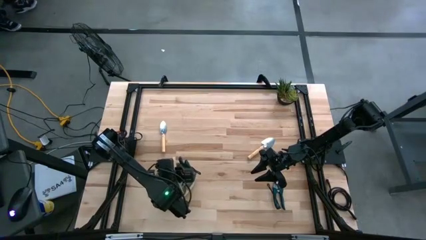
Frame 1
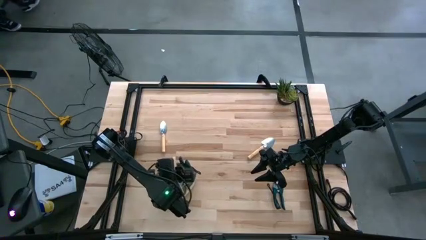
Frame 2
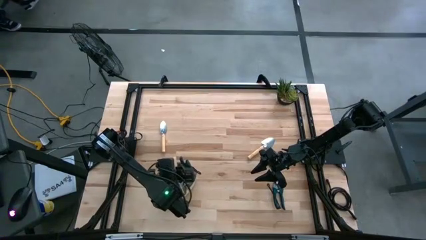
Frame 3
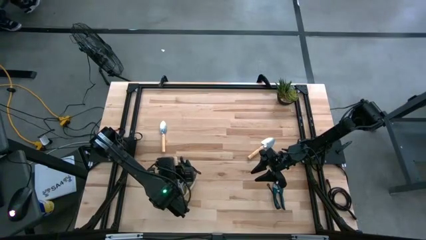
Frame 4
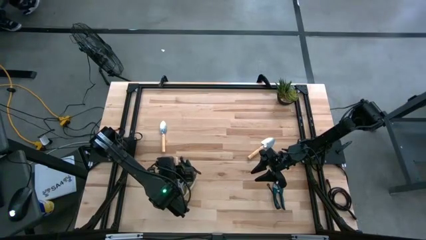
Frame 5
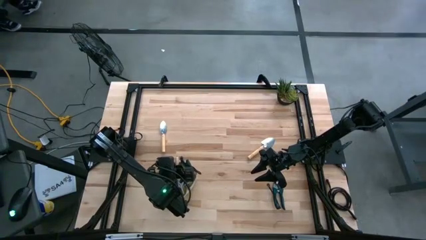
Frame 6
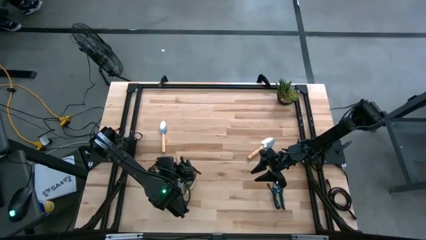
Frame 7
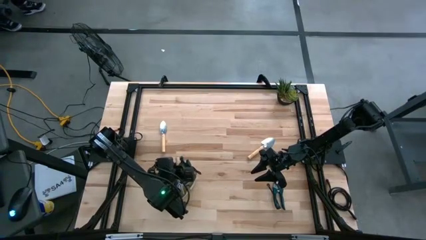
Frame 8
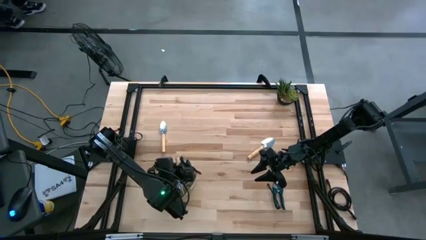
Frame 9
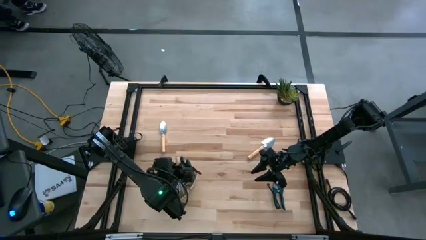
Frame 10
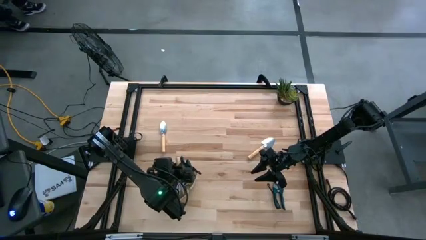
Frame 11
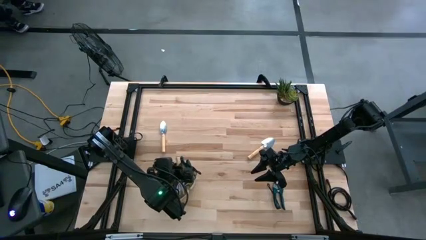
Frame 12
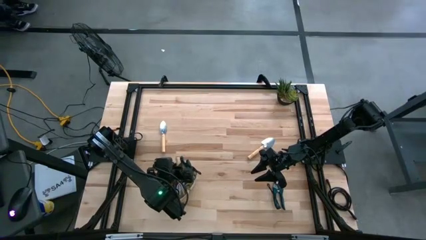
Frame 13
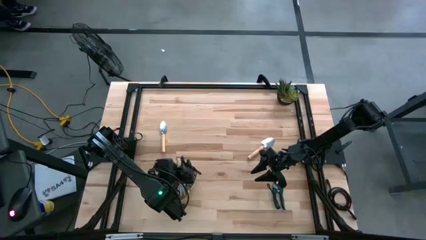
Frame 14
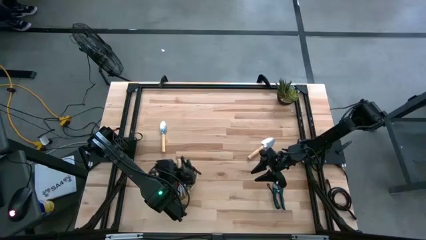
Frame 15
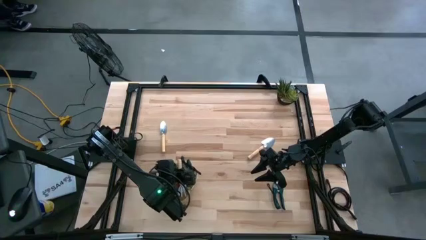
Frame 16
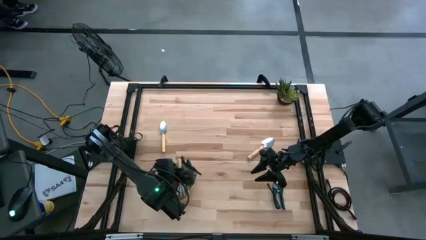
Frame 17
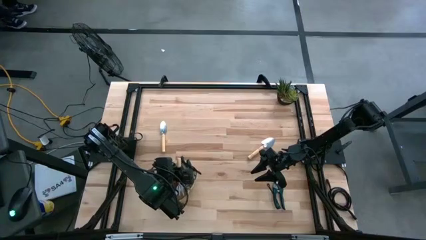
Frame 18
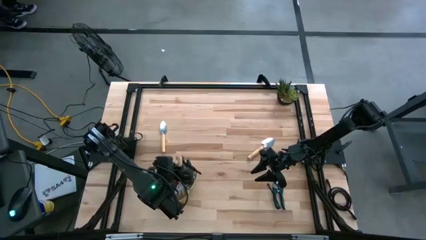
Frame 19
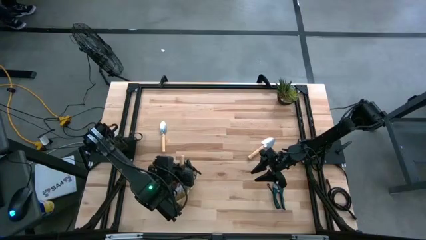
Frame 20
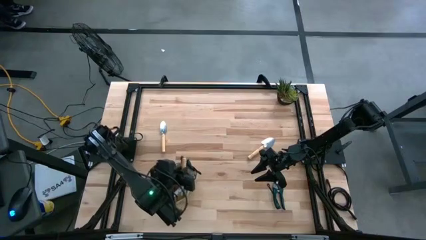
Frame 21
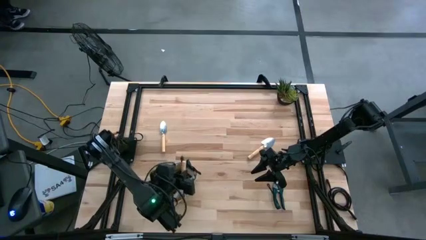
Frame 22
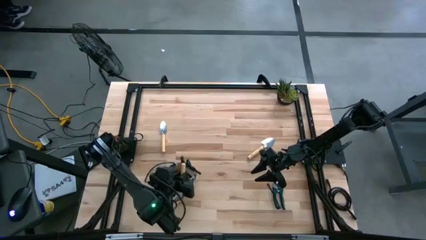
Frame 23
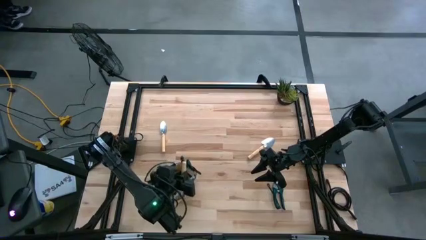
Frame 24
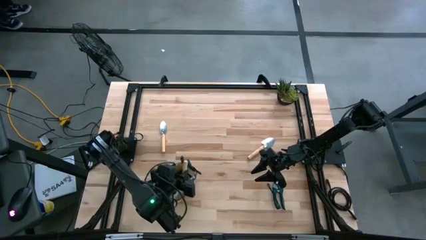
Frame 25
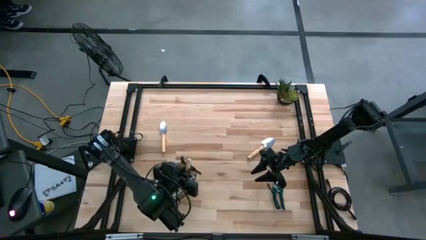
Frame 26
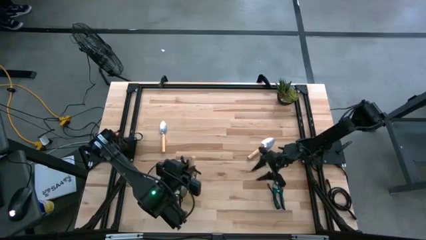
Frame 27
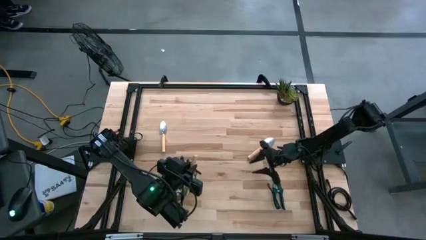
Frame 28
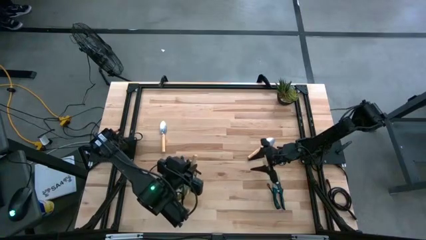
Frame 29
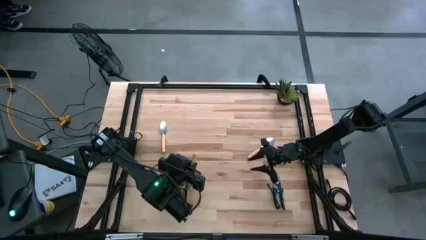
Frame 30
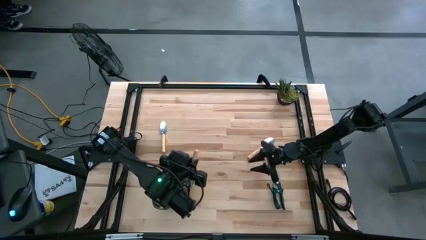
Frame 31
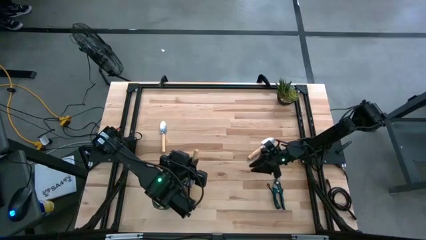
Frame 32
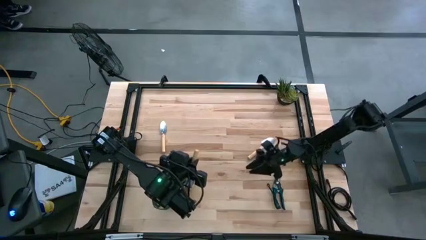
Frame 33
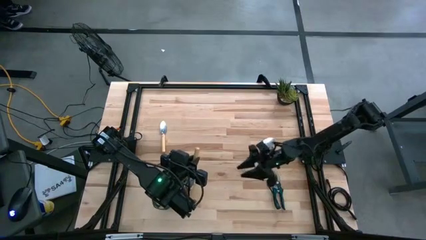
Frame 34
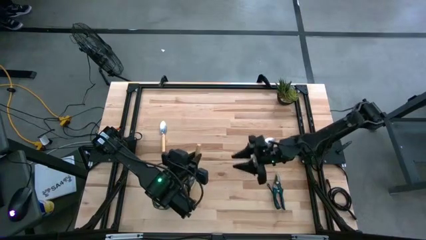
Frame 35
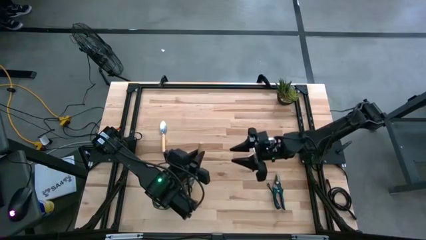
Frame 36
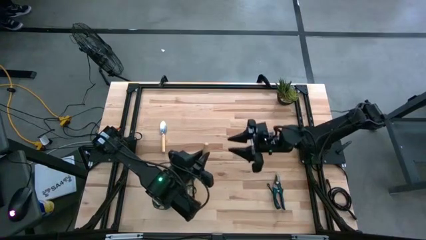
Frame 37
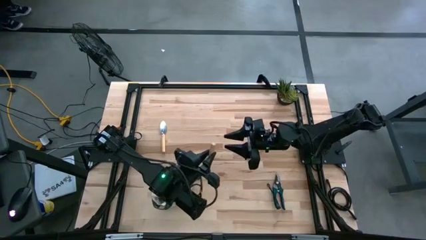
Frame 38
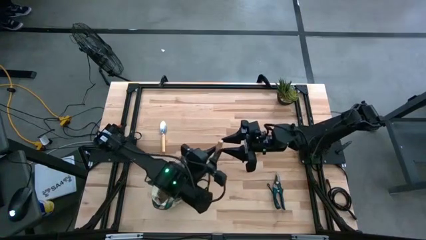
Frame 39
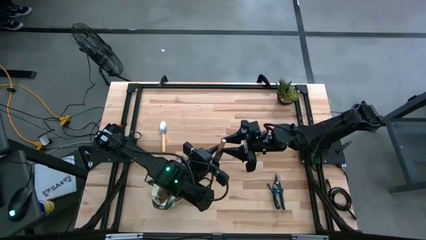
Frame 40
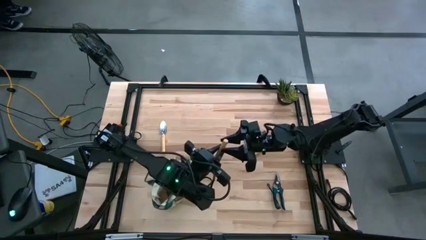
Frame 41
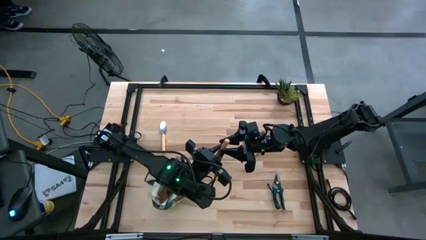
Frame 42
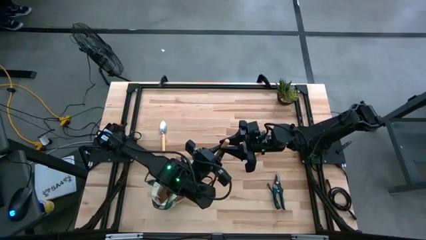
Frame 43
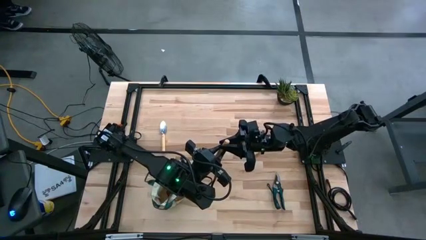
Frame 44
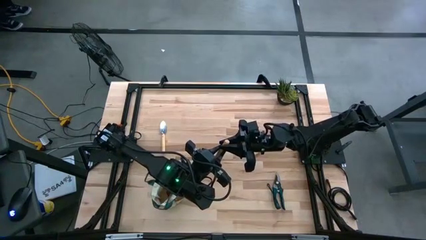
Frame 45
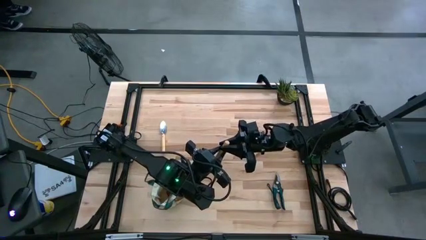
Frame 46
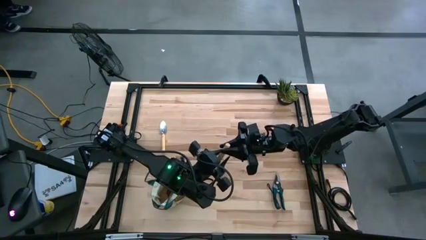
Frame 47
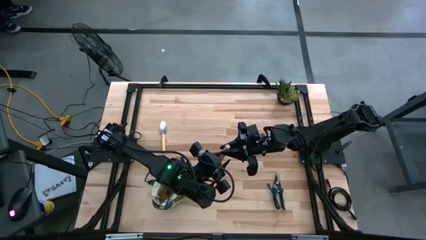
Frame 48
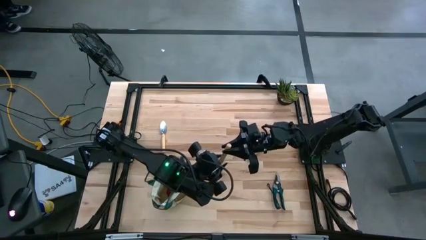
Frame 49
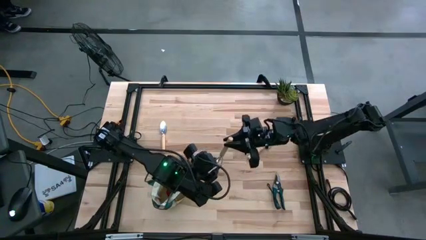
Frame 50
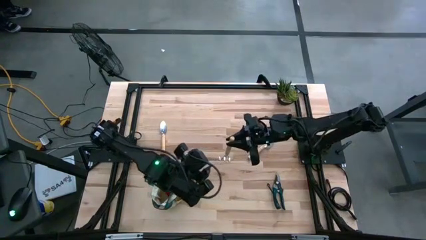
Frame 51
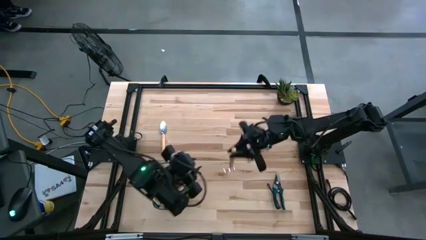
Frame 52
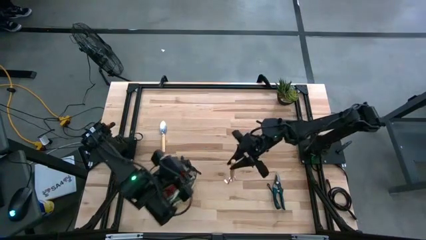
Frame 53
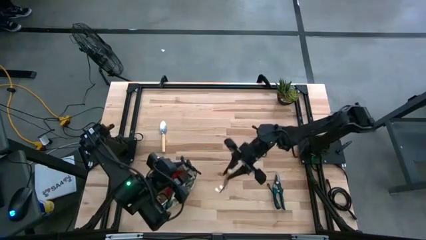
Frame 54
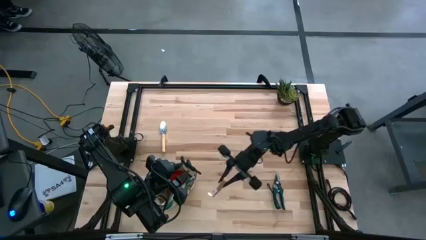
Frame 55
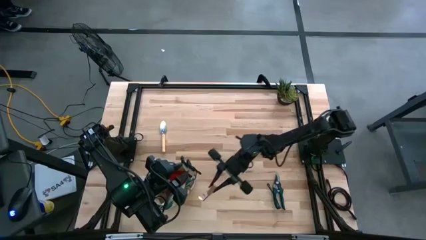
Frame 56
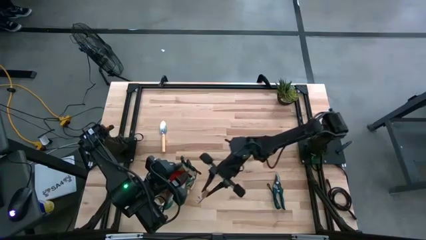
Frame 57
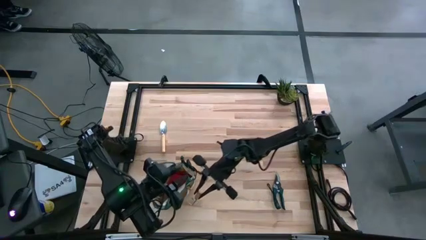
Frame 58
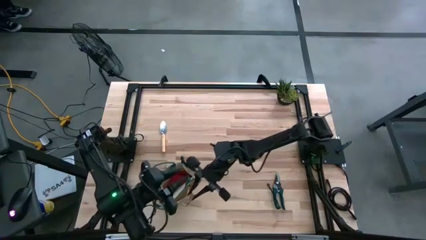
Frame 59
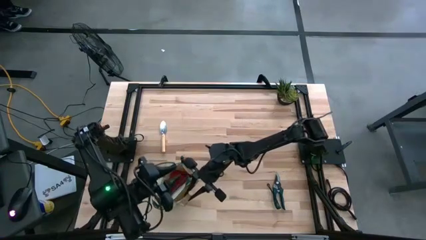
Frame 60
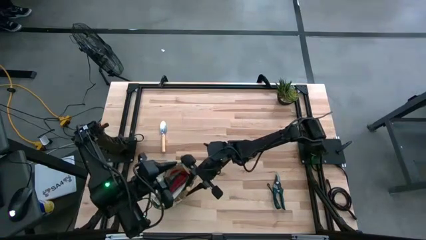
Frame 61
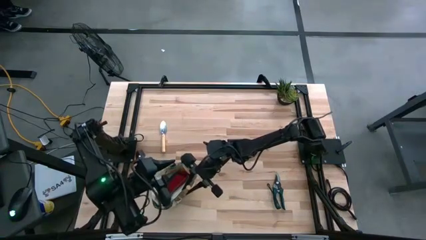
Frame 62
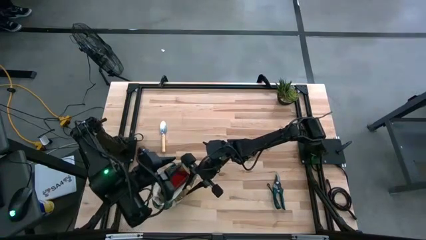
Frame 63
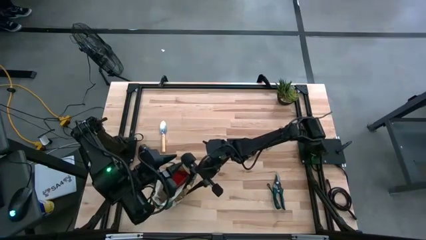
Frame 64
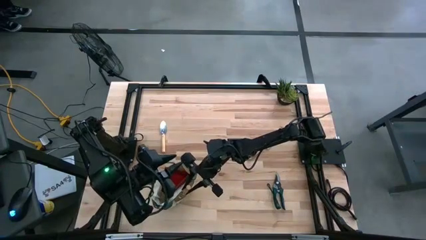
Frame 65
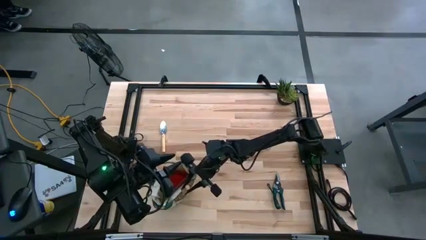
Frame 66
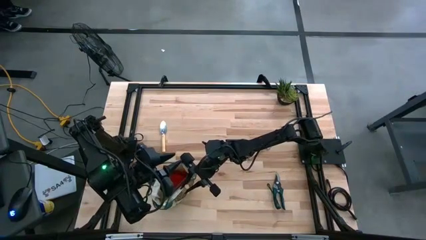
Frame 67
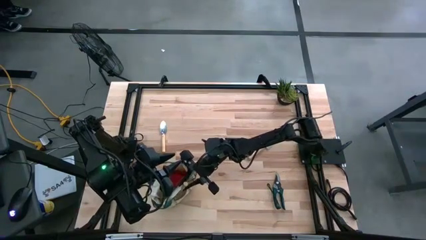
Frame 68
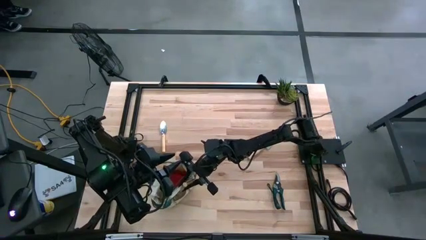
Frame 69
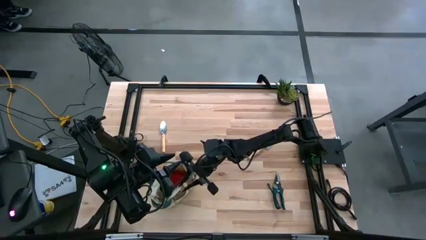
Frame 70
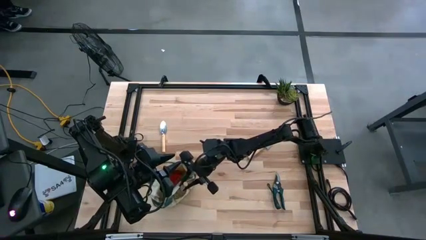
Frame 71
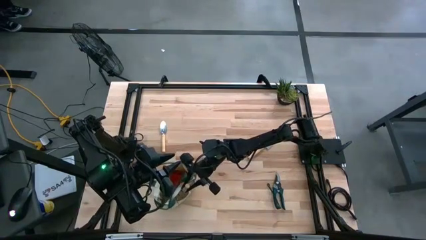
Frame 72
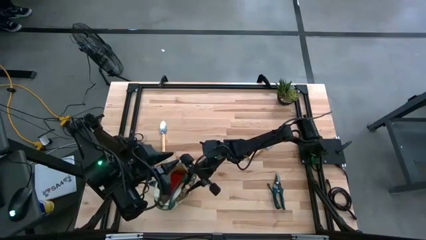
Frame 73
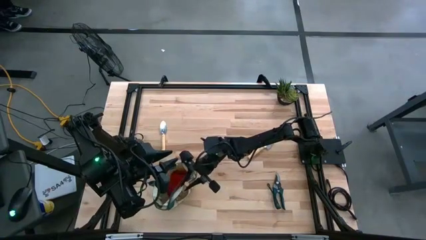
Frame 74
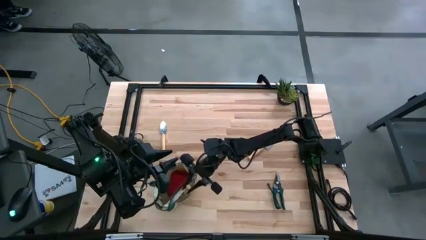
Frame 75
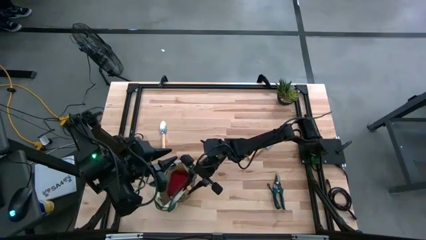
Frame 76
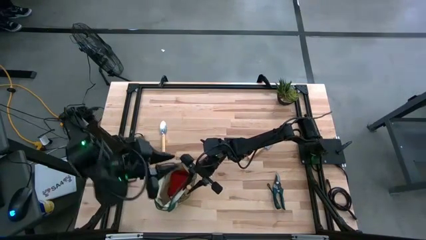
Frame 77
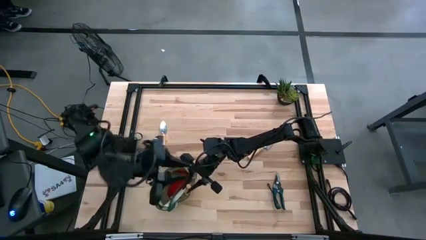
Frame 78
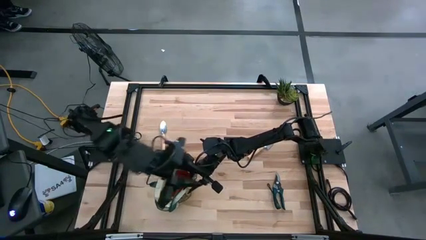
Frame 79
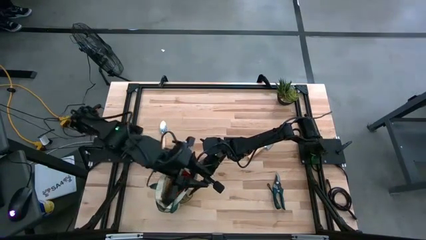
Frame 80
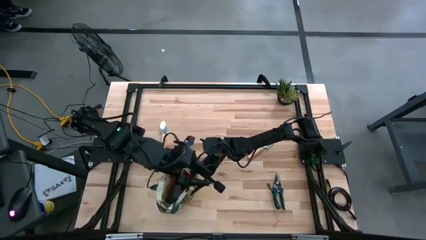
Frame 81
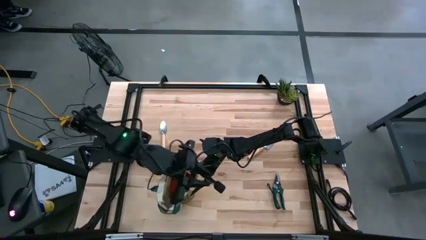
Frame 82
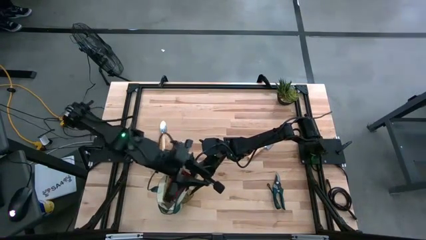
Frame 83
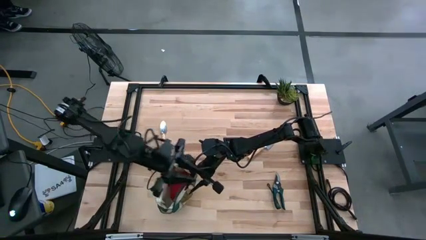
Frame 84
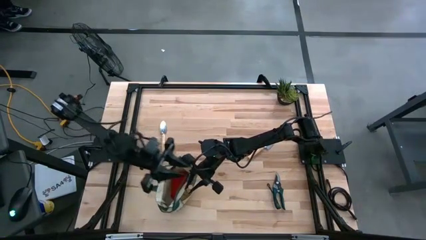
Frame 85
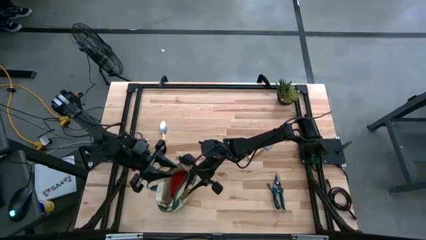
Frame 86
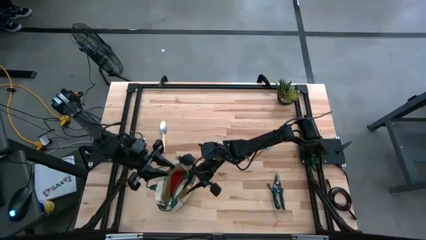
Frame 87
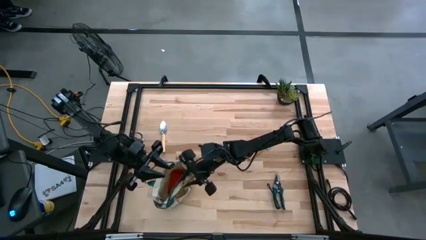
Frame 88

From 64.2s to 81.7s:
Task: Pick & Place Garden tools in Gardening bag
Put the hand rake into the gardening bag
